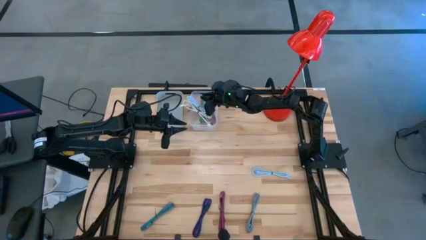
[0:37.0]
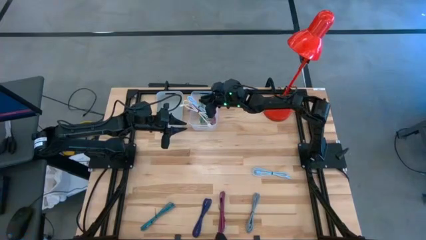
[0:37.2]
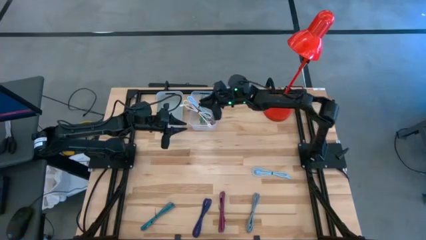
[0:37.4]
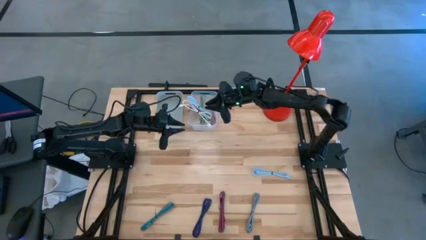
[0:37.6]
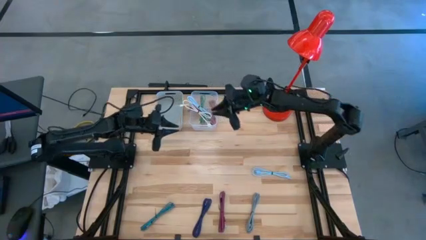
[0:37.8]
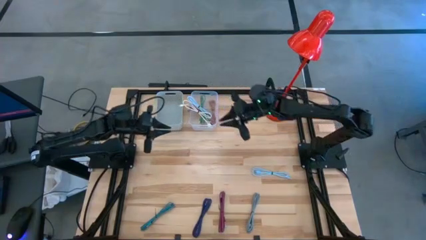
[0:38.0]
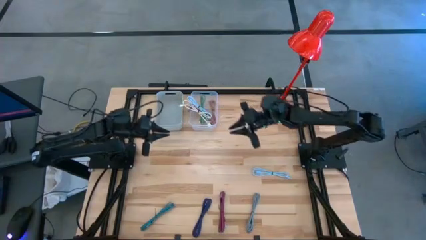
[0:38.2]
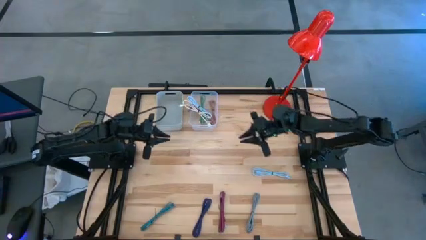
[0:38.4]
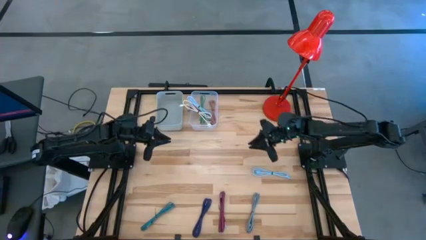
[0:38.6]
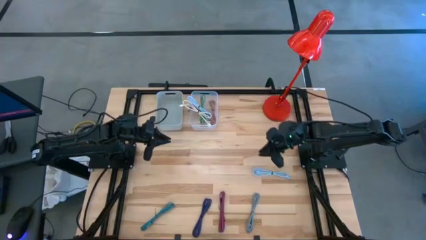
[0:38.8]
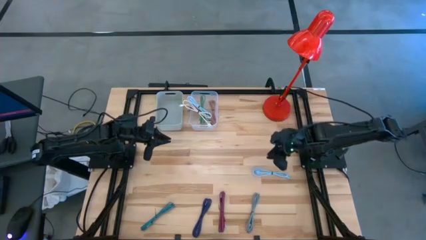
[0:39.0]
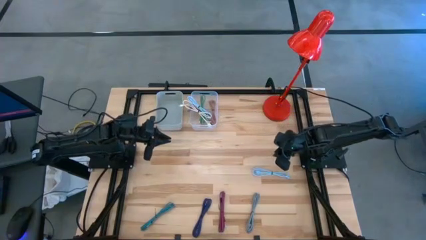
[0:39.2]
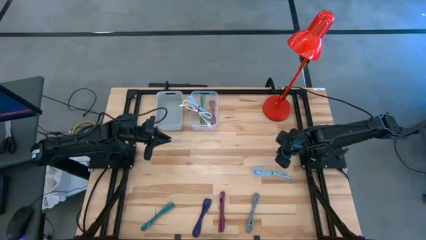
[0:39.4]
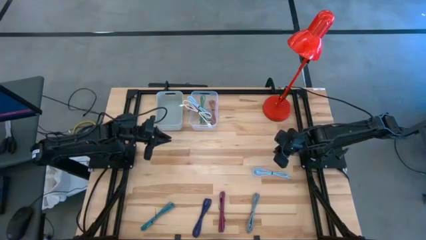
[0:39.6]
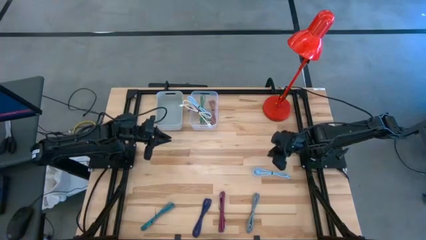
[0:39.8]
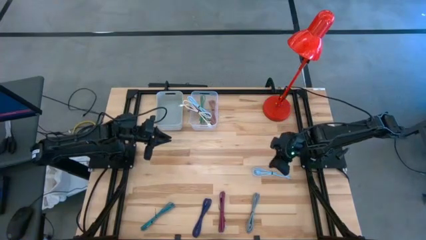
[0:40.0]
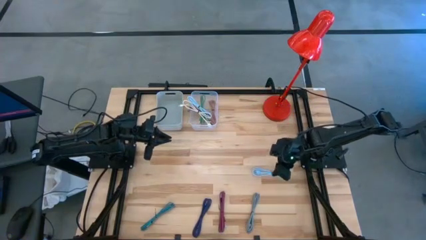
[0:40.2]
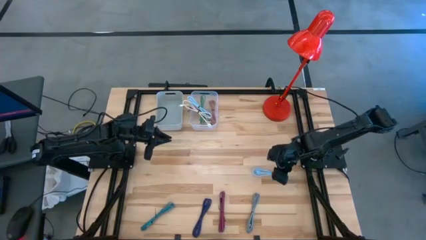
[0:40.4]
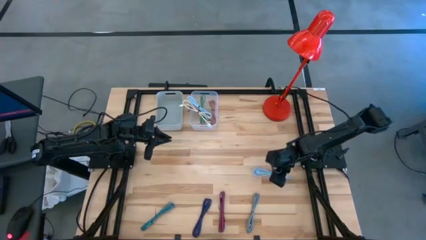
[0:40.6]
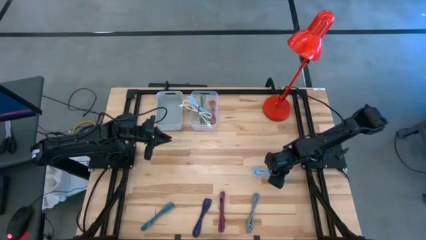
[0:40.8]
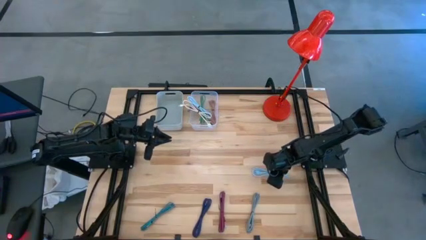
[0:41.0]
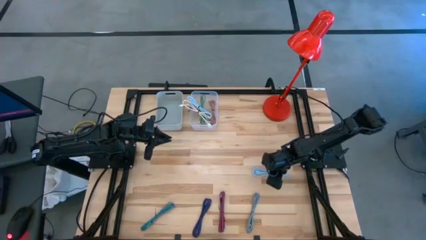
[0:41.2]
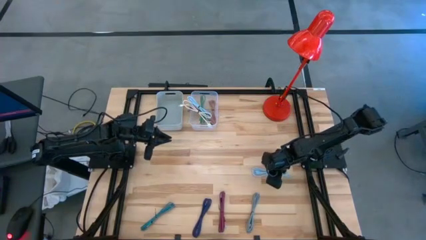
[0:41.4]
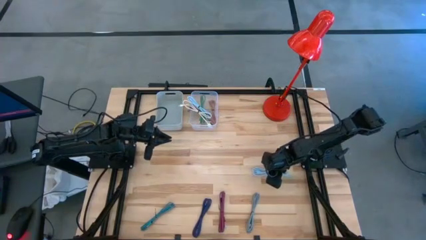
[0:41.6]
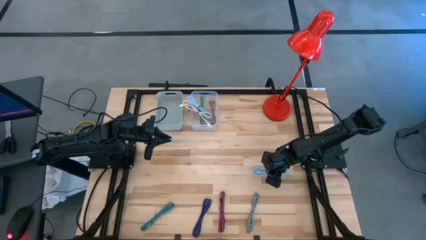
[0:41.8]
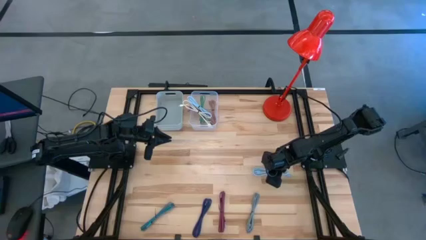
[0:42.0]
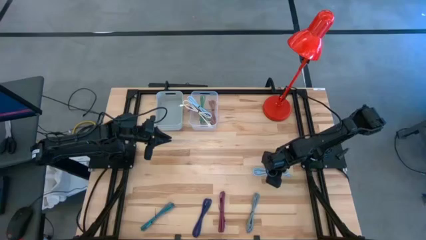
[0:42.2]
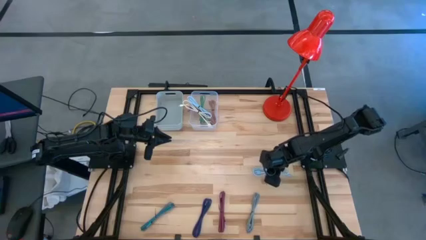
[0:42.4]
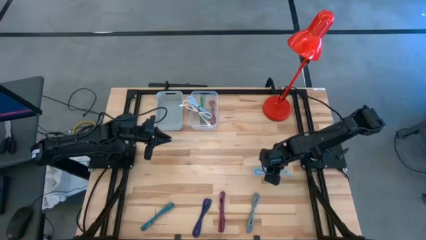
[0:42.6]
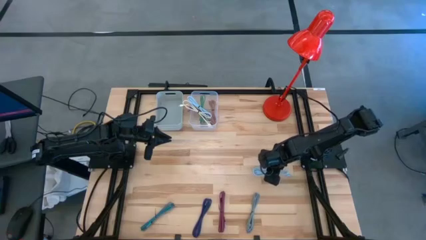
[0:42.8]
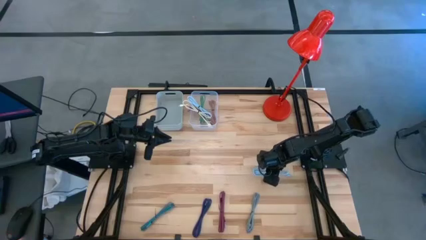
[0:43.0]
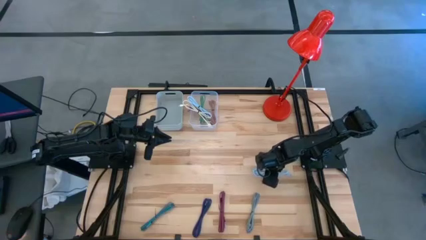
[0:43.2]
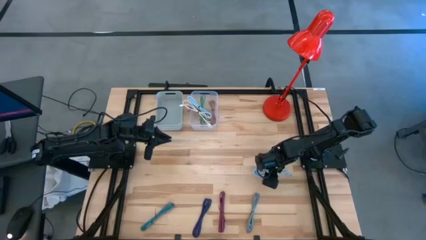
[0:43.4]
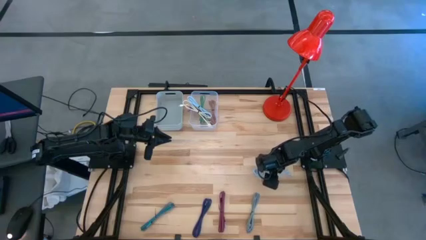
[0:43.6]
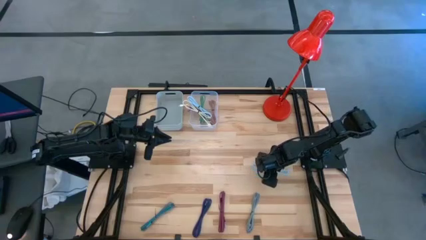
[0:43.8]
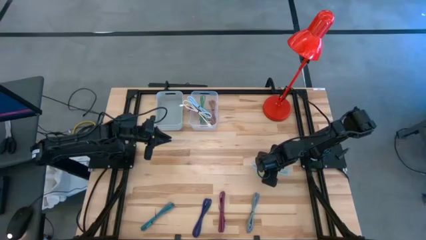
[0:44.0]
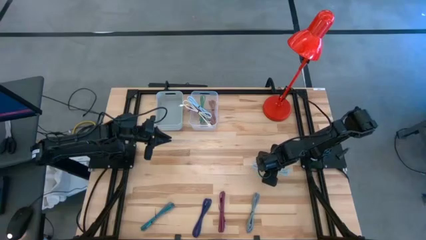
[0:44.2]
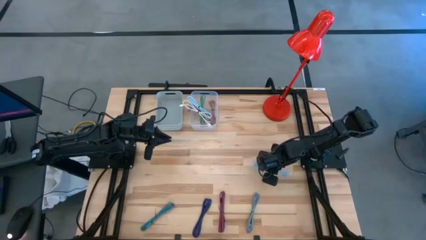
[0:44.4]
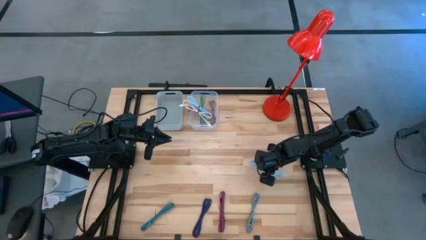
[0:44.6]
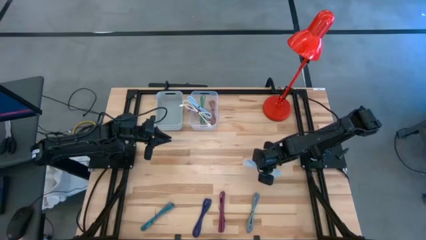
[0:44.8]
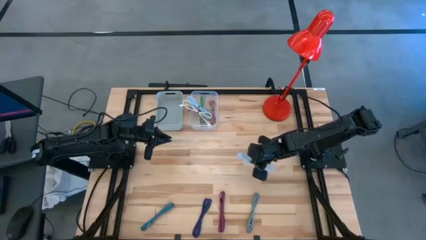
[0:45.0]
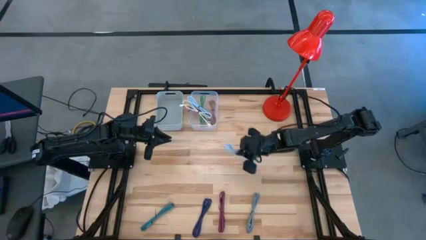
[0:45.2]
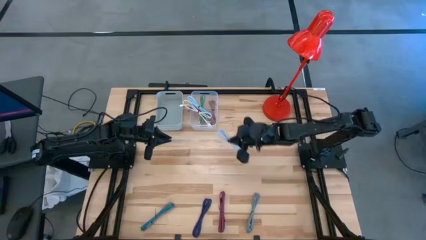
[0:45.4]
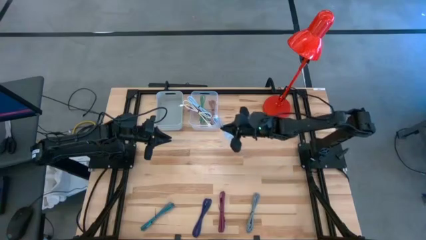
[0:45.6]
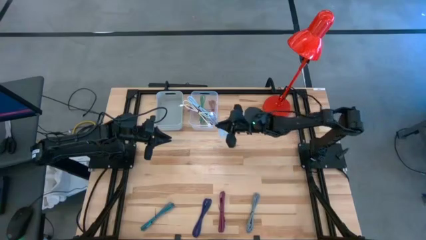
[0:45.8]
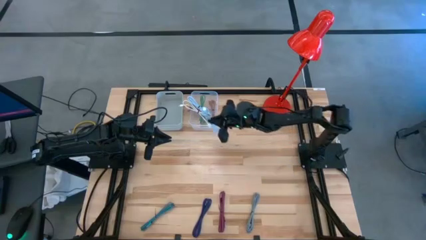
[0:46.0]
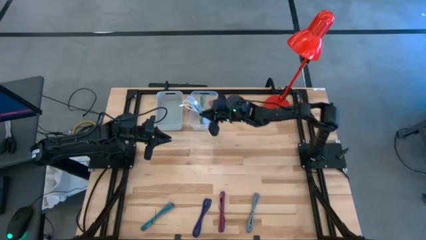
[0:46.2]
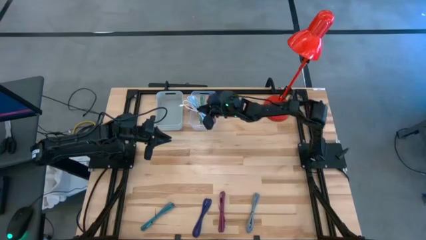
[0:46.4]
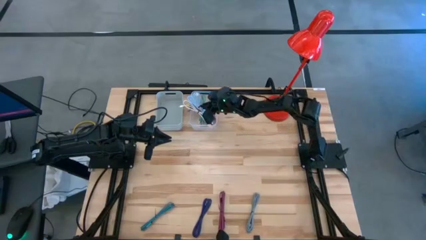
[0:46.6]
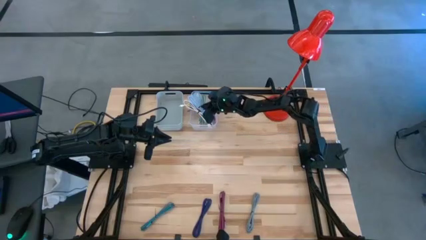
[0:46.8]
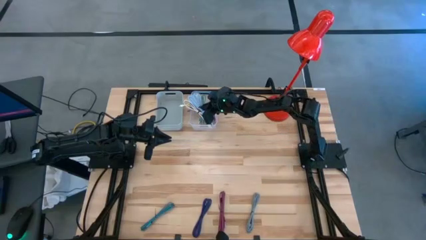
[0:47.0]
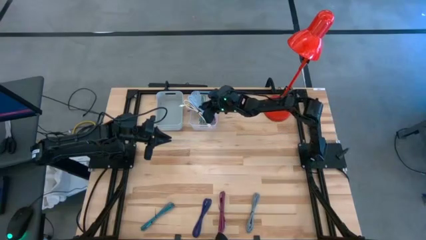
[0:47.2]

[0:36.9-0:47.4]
Task: Pick & Place USB Port
Put the light blue charge cable into the transparent bin

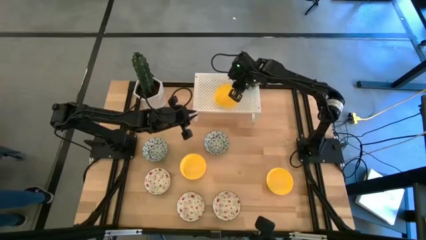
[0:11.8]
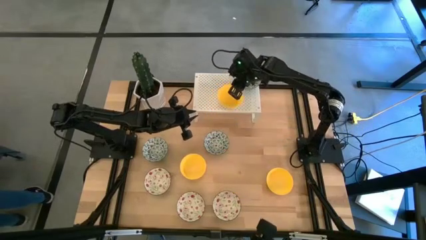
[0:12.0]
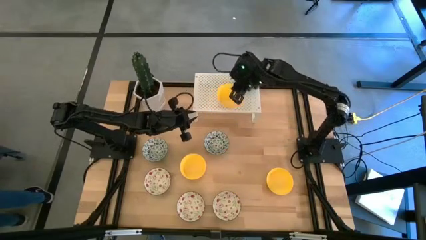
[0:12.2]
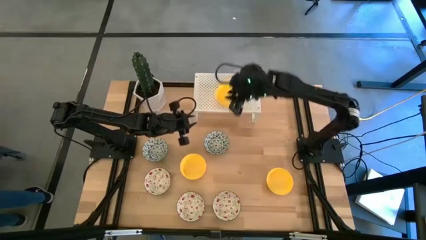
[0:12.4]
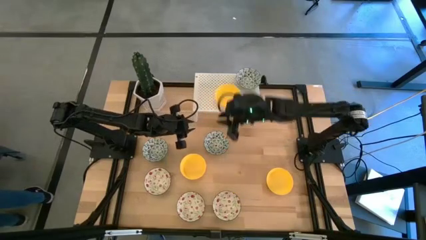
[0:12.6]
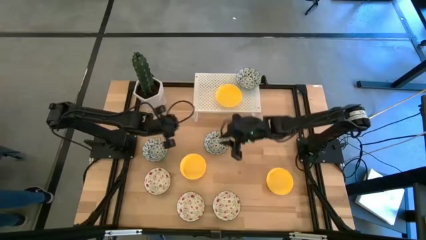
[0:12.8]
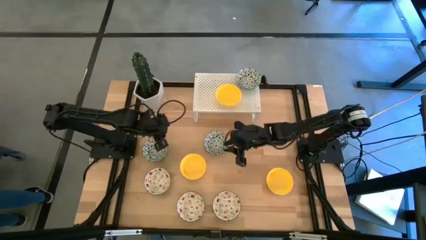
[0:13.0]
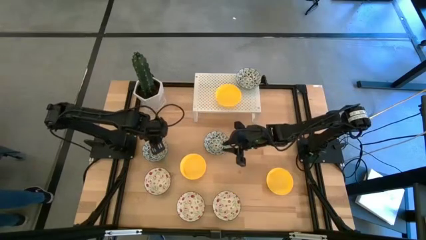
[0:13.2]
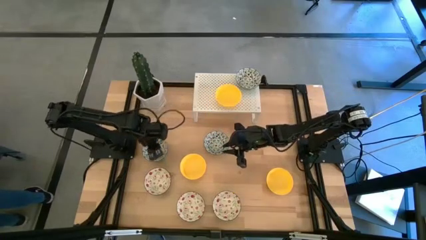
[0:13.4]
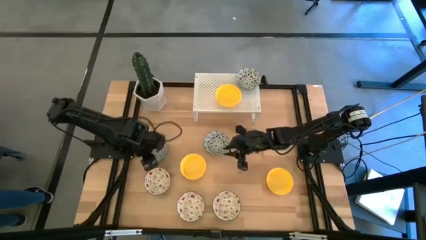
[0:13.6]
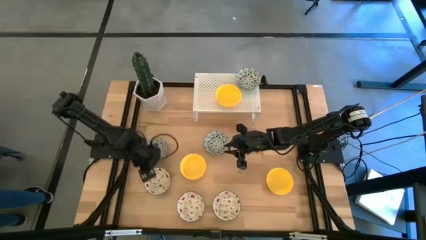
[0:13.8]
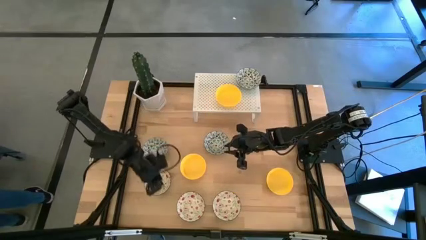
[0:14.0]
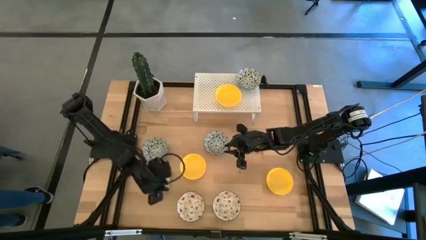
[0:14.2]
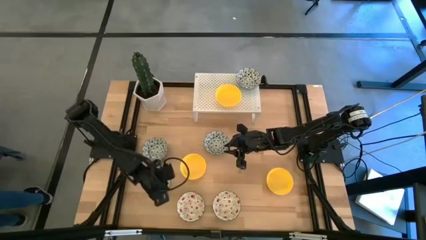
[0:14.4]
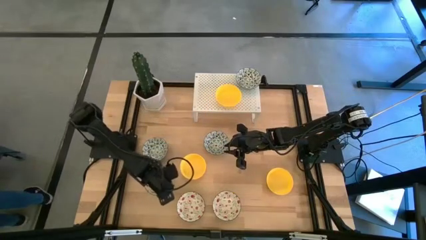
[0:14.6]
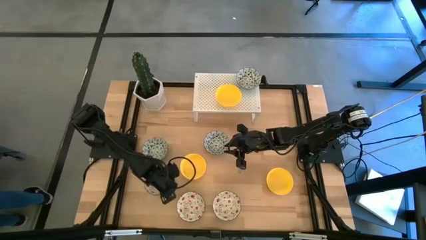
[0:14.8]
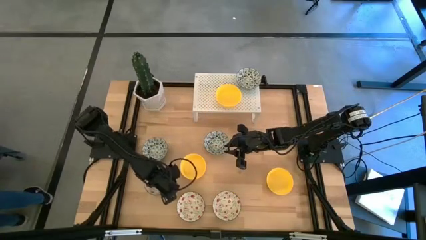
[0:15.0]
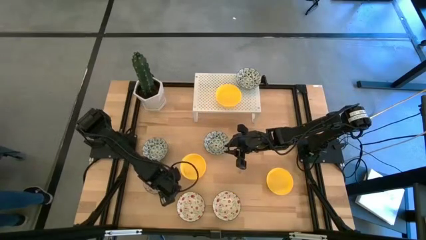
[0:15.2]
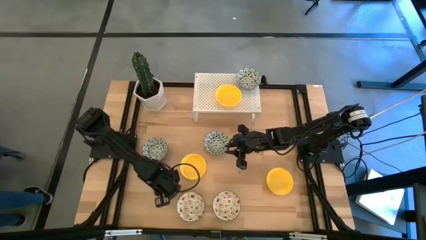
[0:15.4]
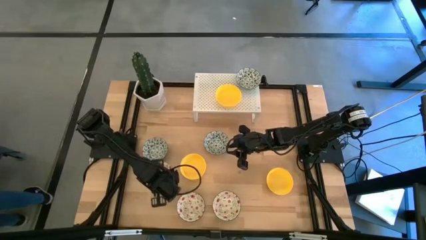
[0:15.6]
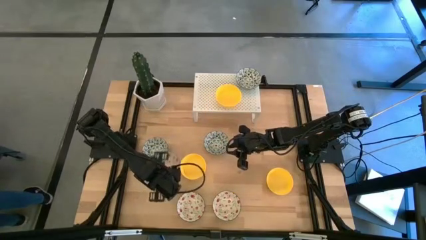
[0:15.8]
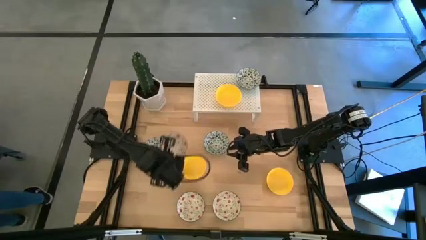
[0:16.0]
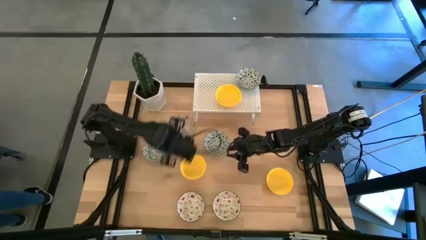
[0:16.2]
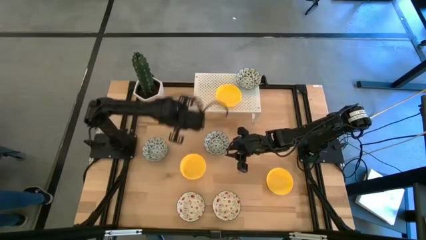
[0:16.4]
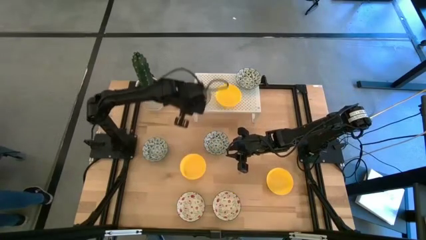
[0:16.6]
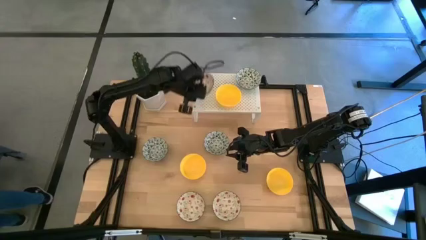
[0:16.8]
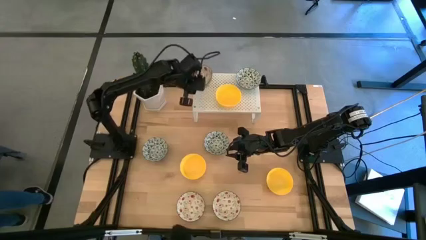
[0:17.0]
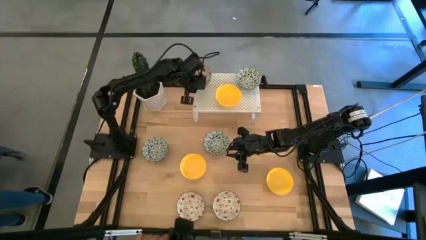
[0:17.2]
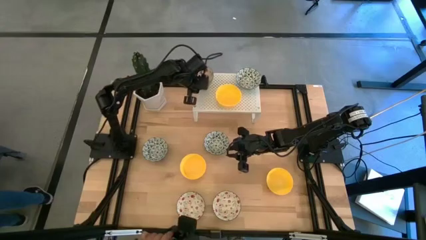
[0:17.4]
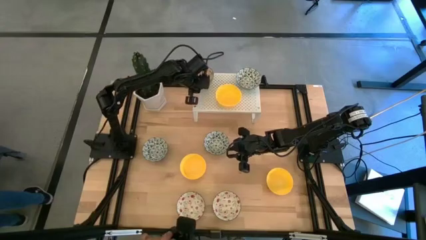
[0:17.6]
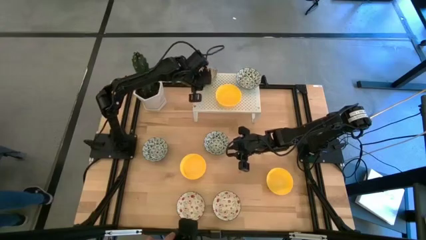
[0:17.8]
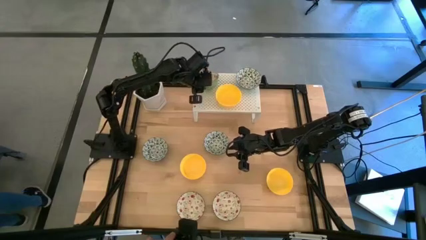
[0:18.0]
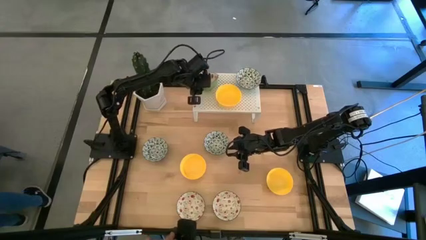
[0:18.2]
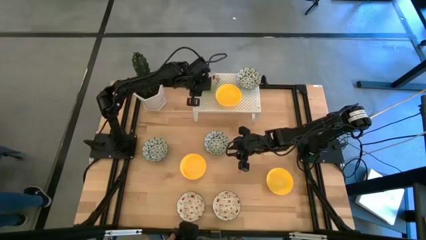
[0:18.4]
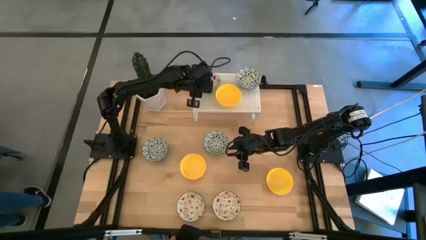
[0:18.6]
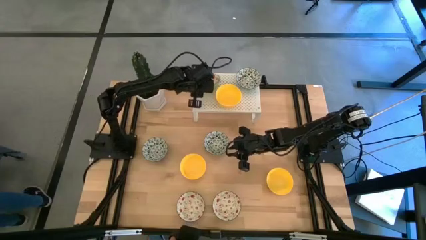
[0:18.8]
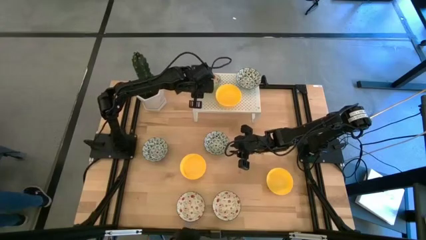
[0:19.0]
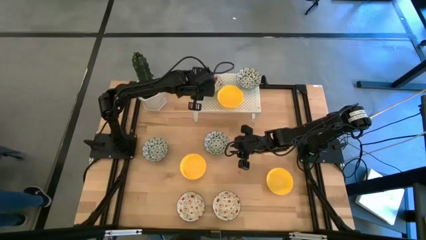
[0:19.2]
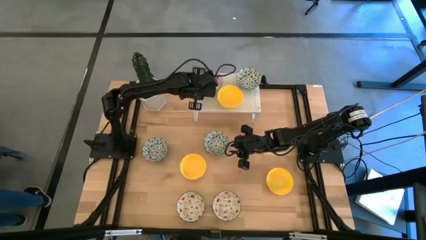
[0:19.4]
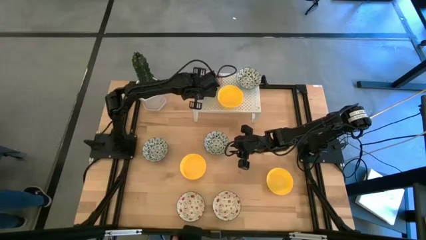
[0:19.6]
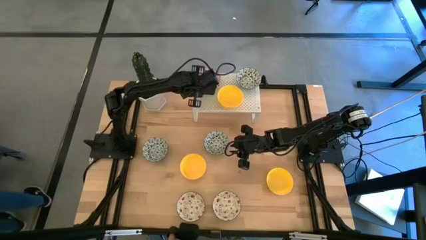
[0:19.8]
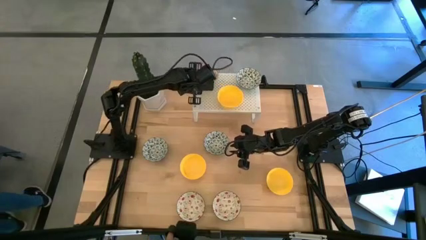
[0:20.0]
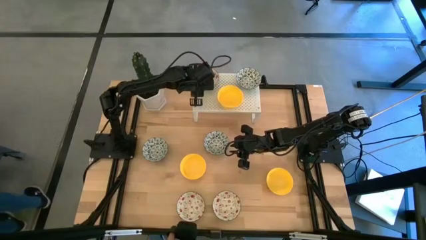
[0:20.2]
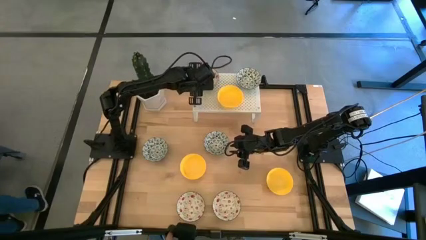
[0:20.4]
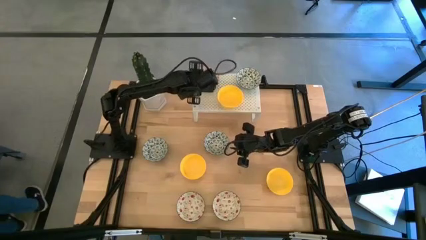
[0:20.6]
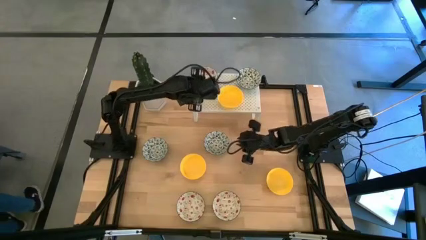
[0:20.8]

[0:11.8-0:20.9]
Task: Pick & Place Mini bowls
Put the top left green patterned bowl on the shelf
